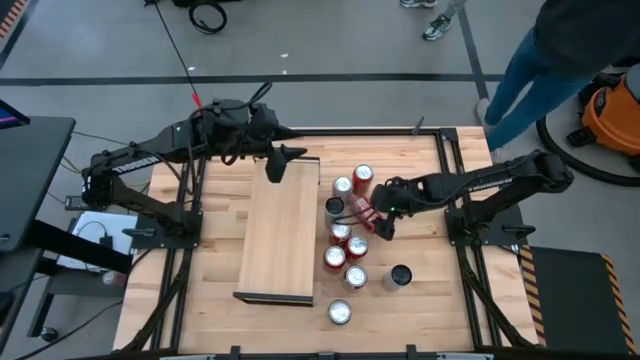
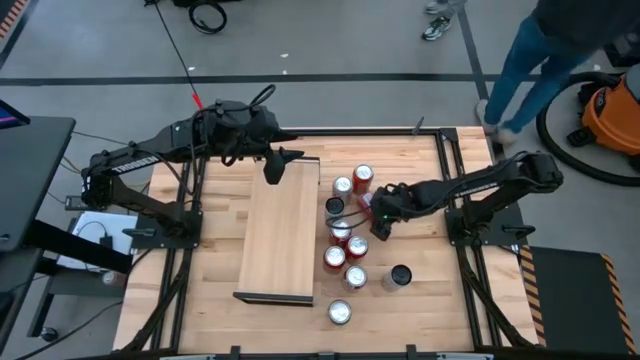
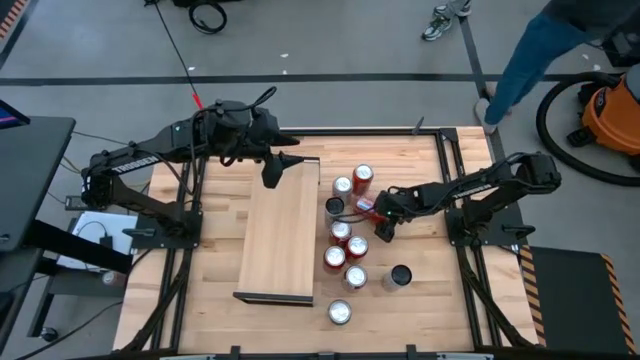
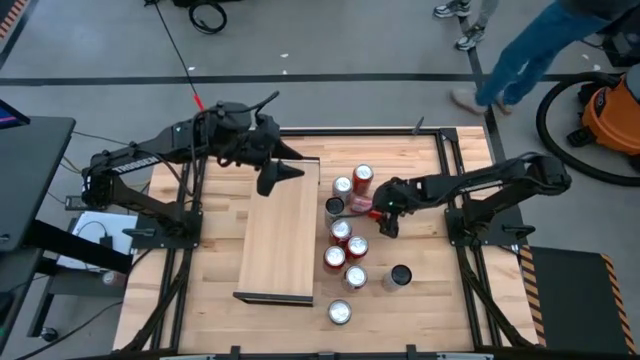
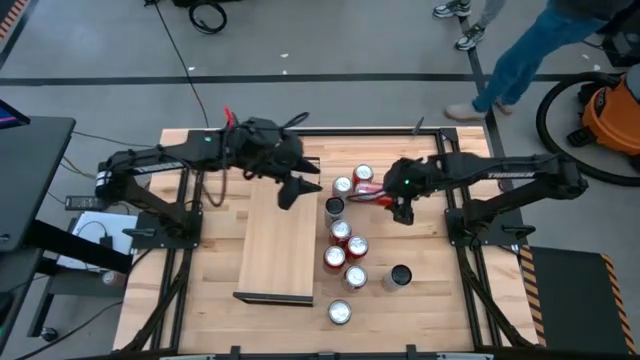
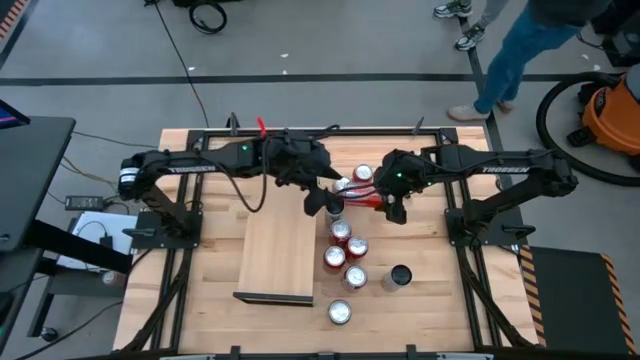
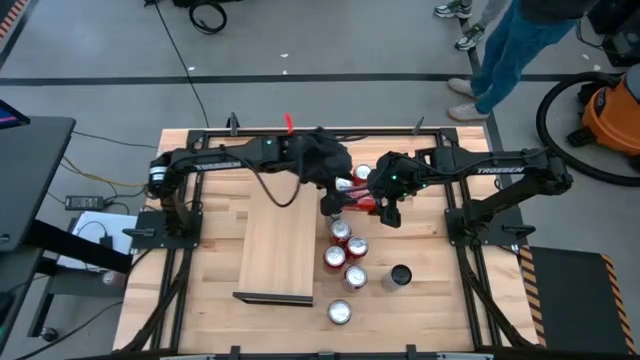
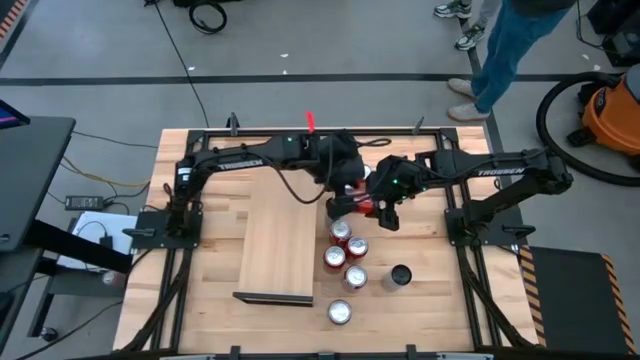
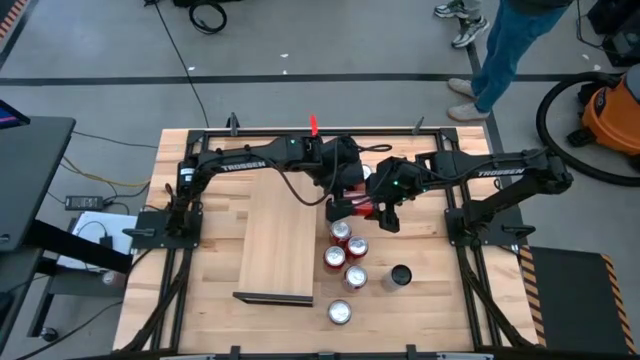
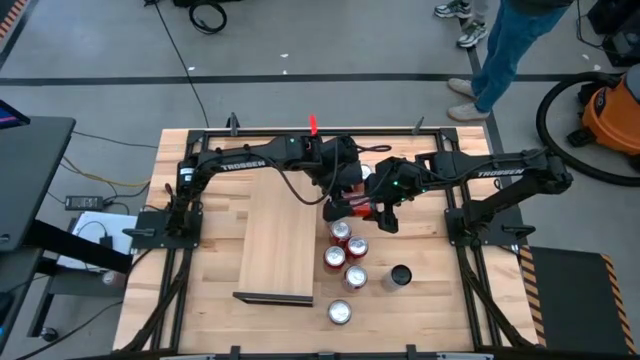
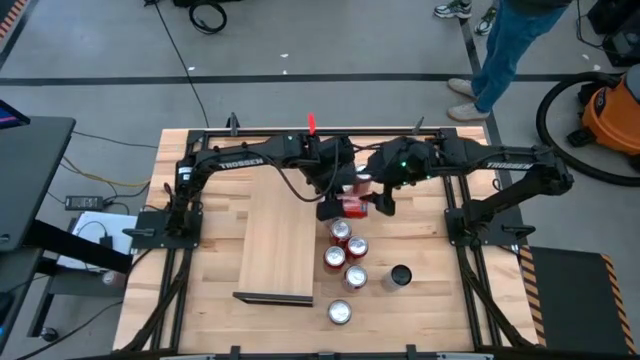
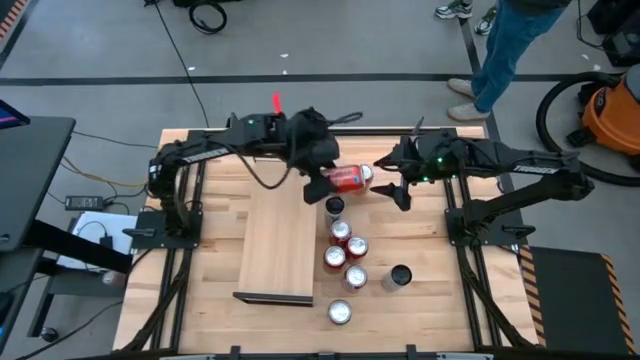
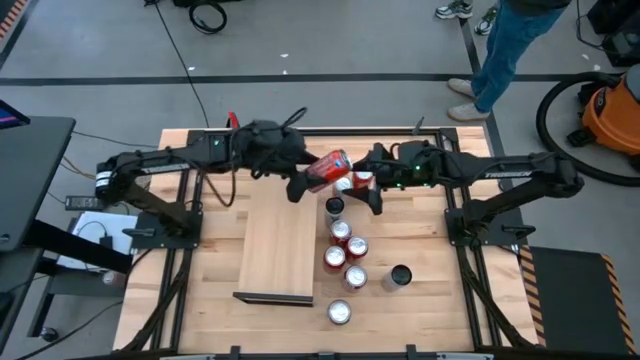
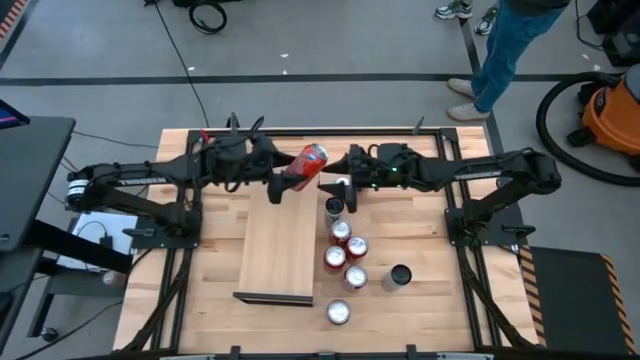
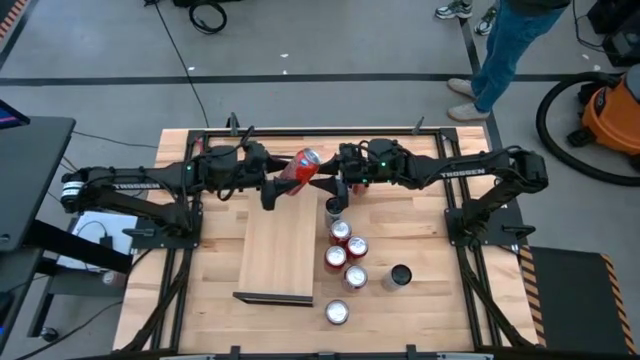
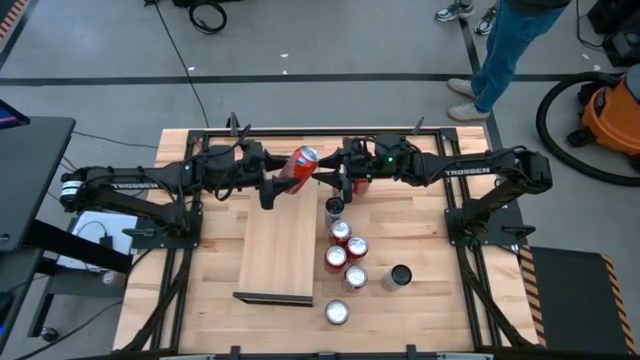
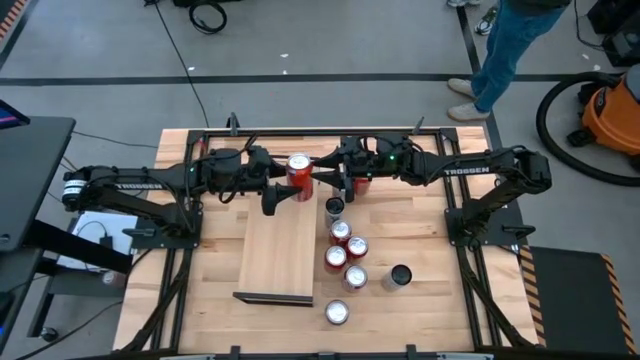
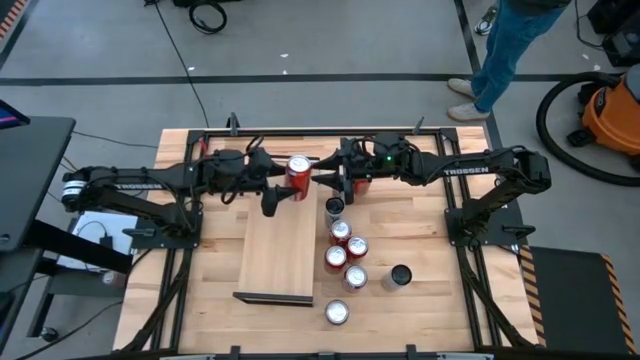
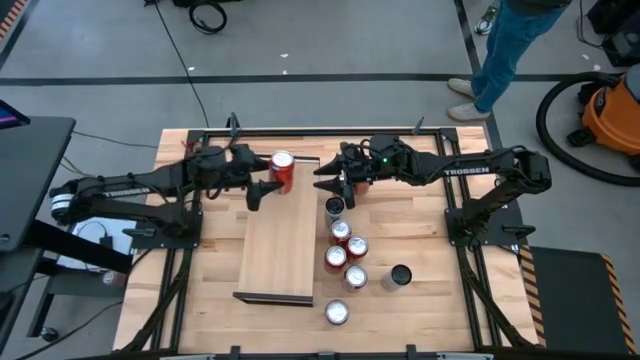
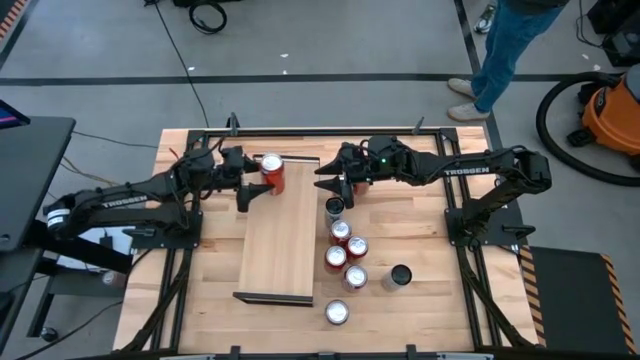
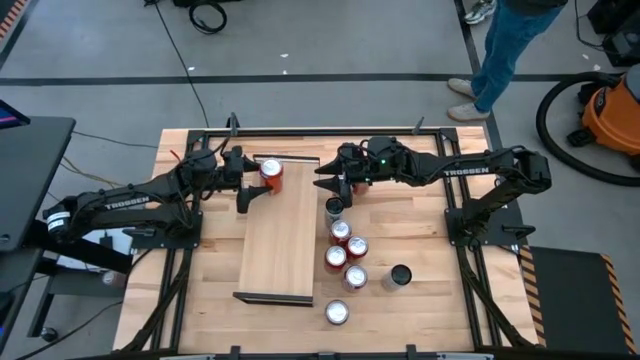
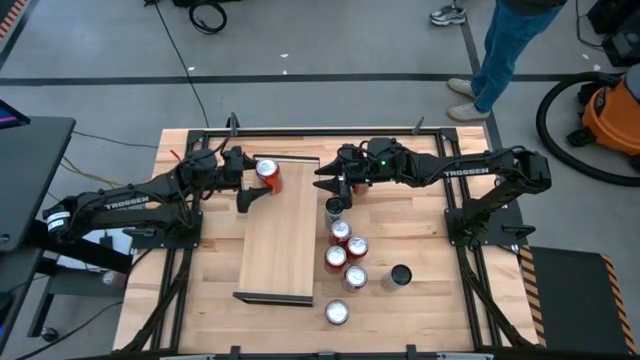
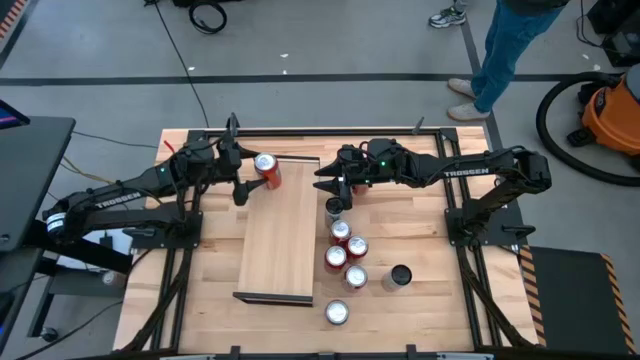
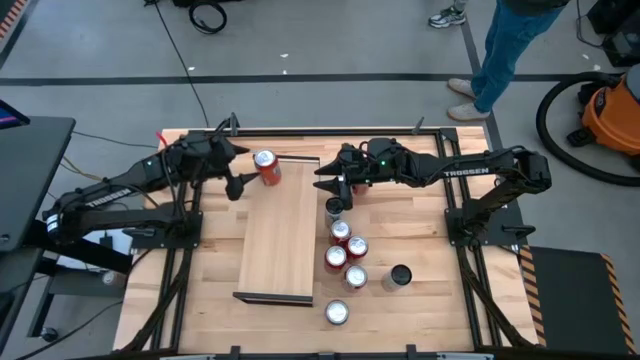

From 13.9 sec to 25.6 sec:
Task: Place canned beverage on shelf
Put the bottom orange soda can on the shelf

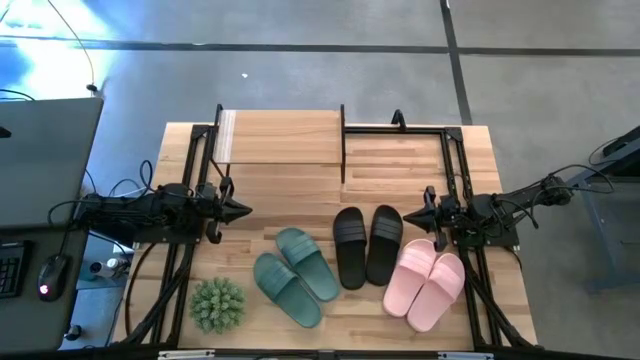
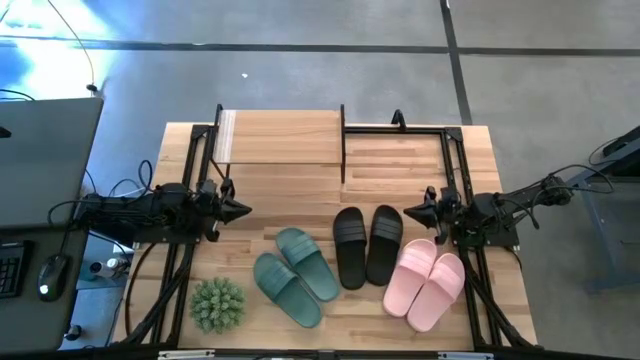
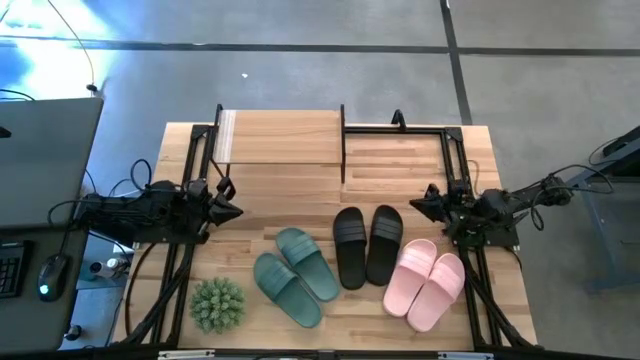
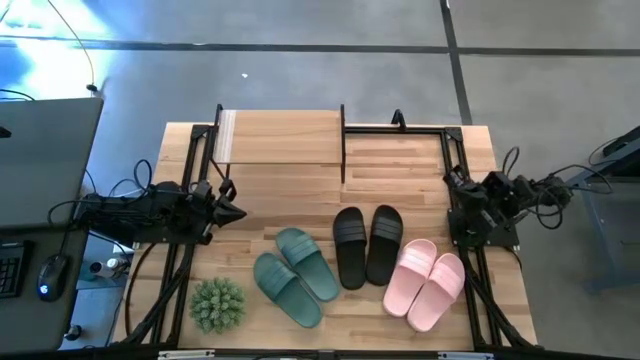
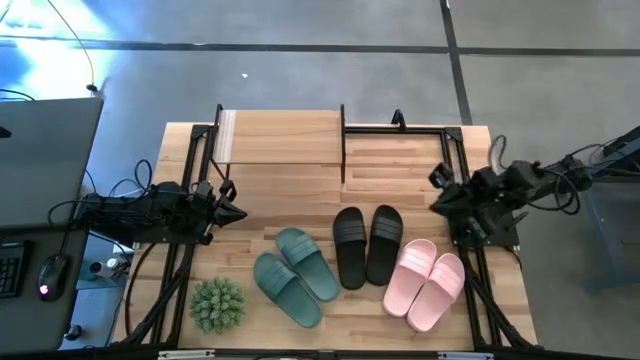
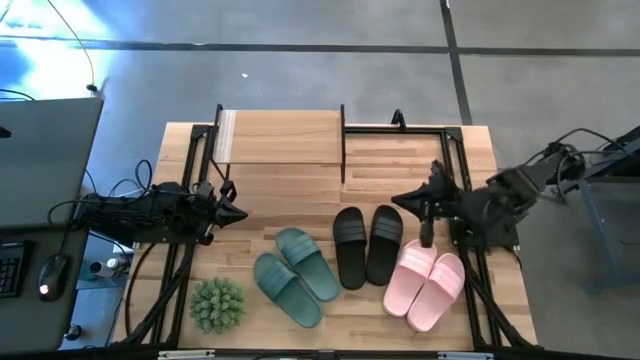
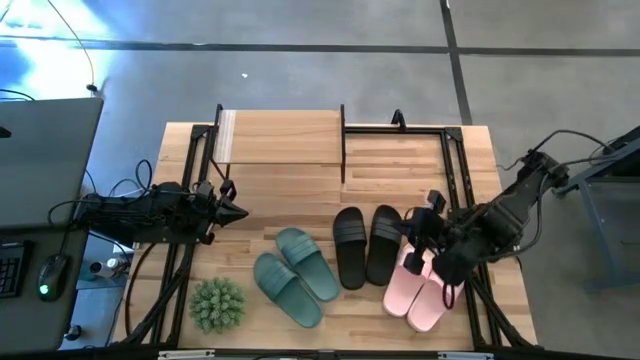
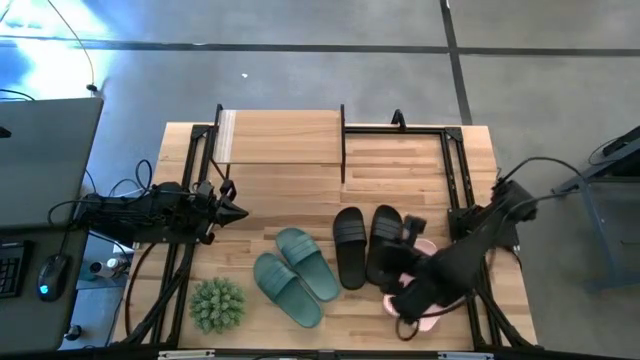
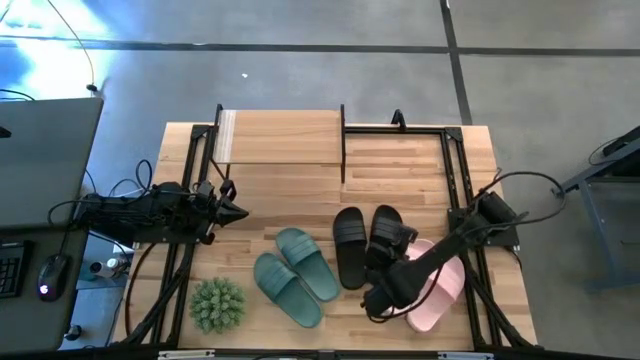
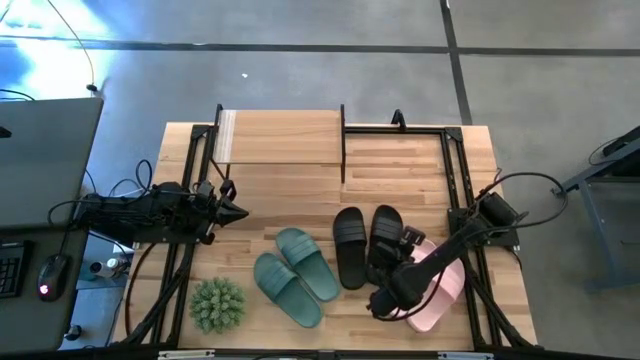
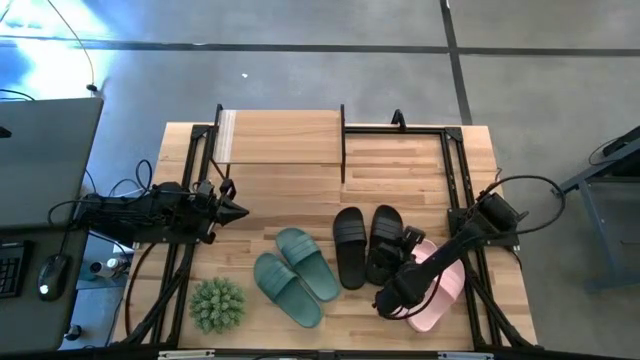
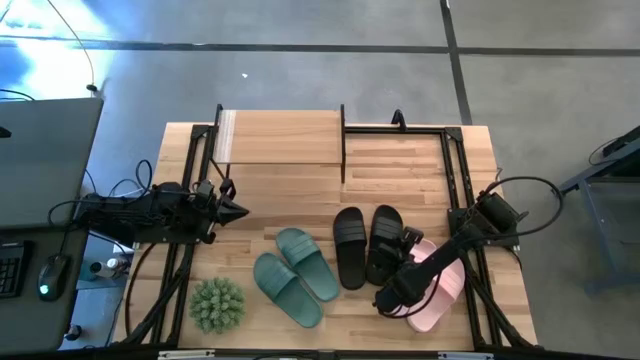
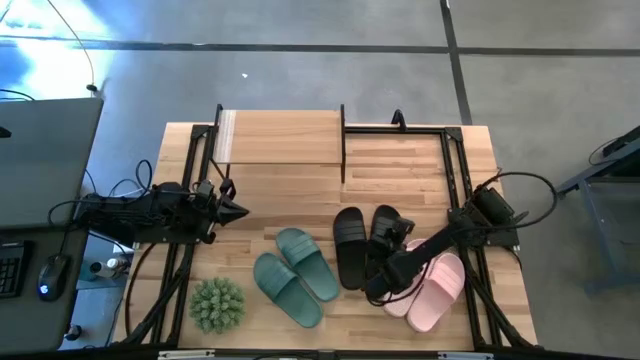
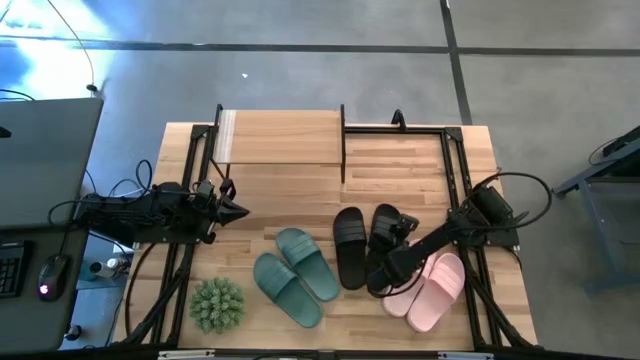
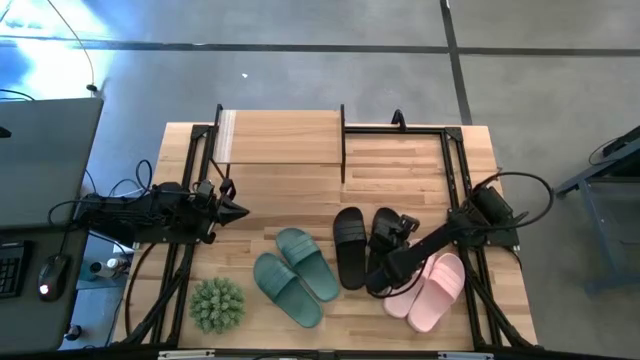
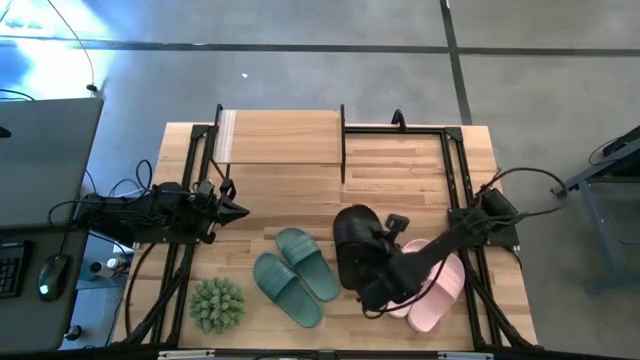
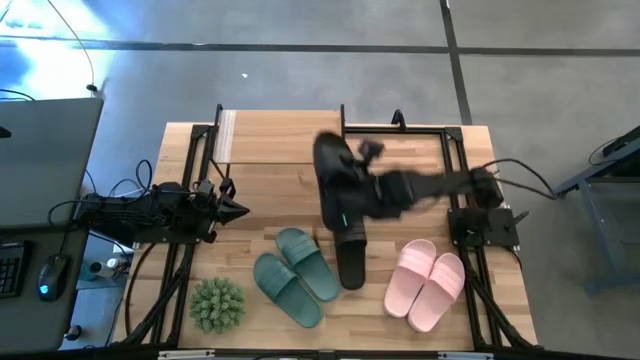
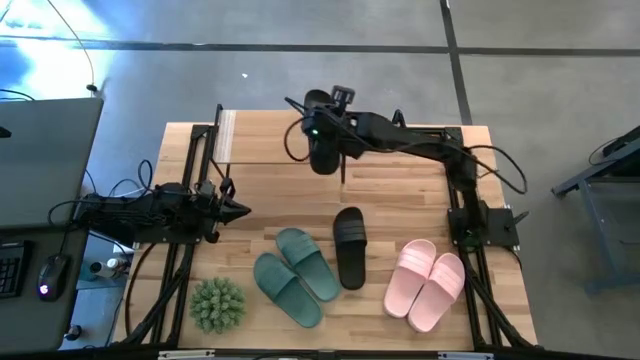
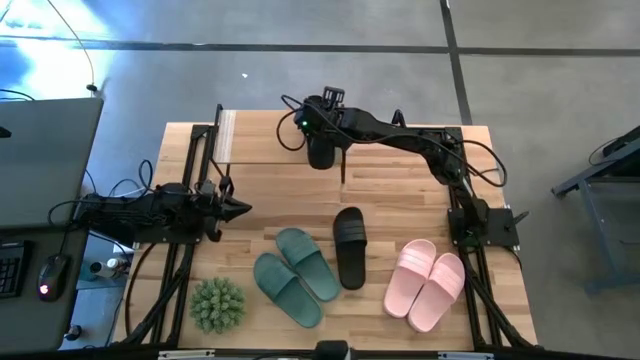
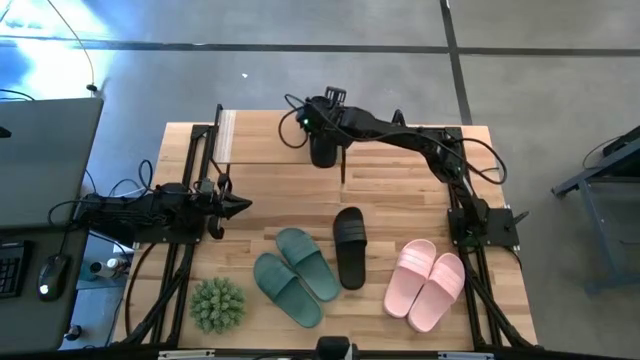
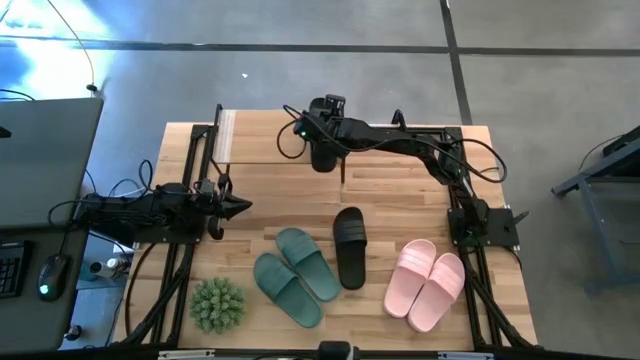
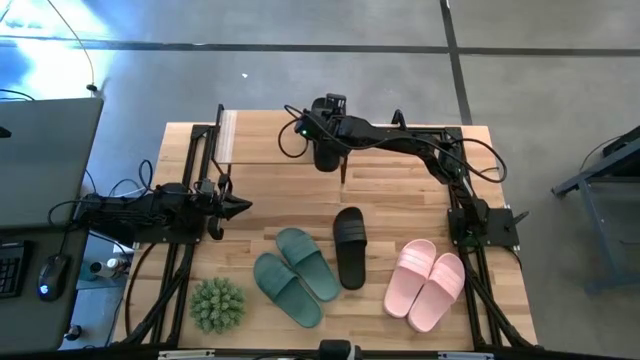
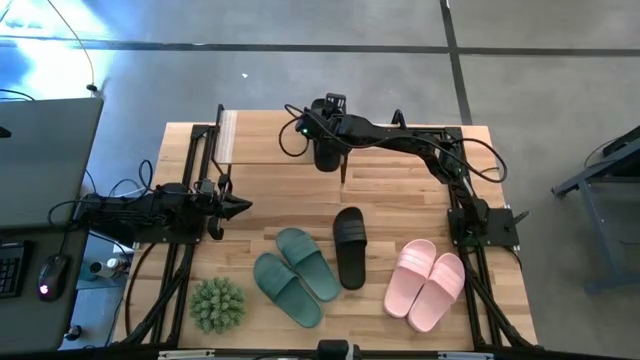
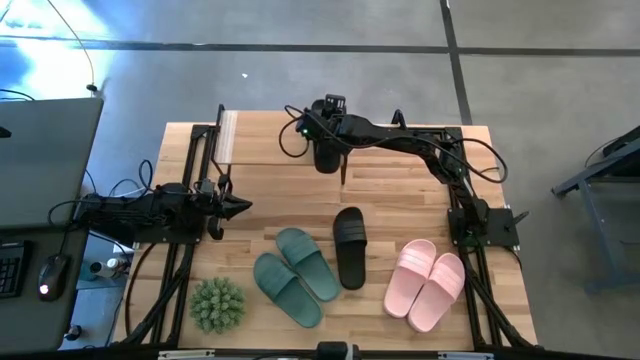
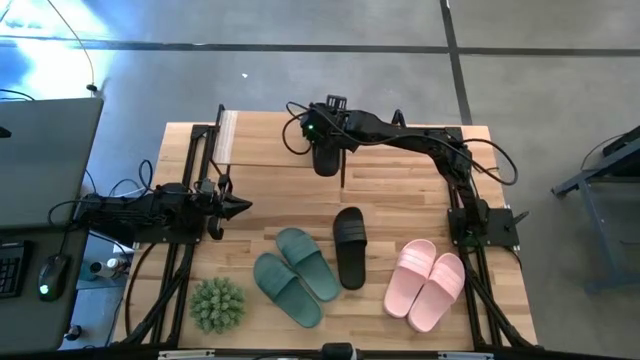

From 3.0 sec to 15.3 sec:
Task: Pick and place slides into the shelf
Put the right black slide onto the shelf
